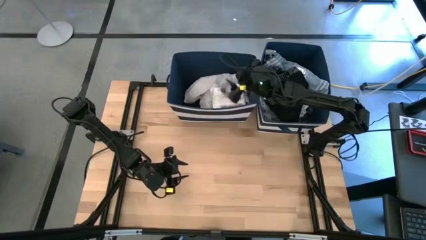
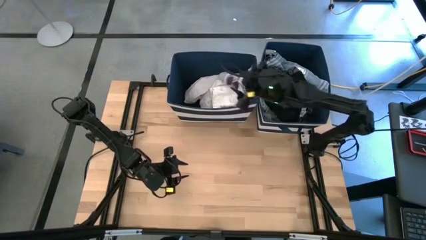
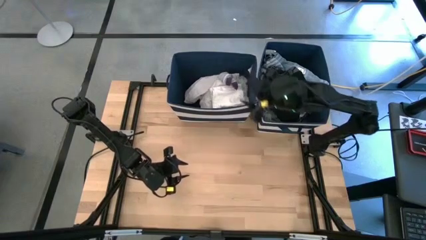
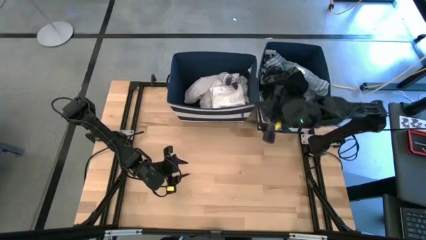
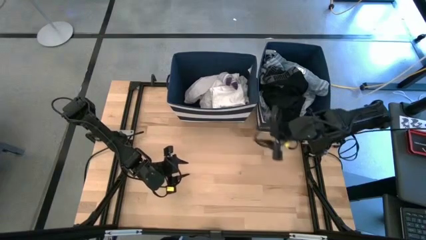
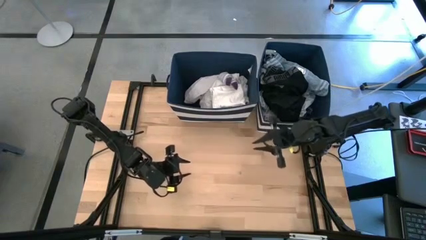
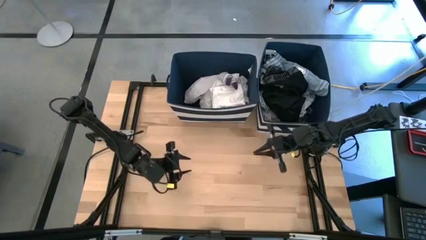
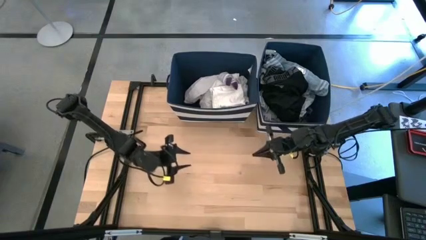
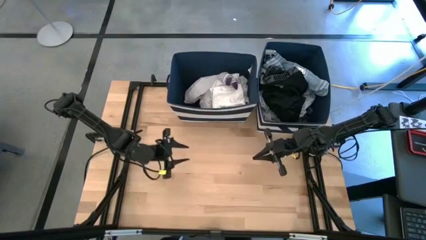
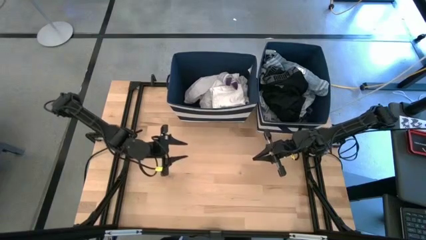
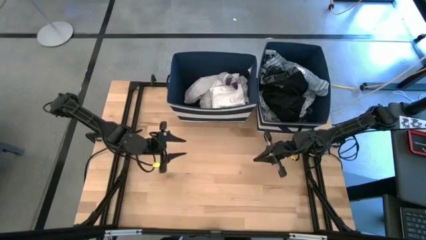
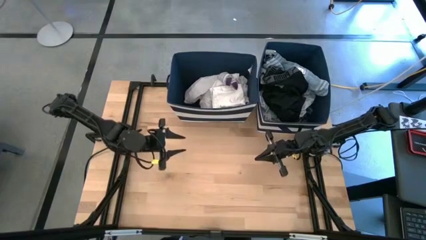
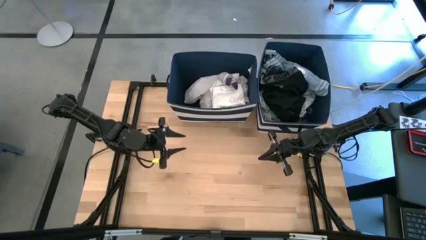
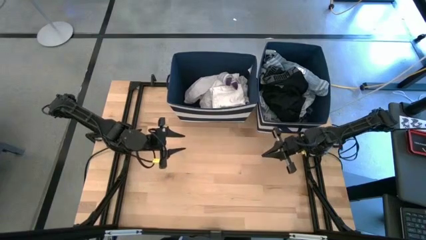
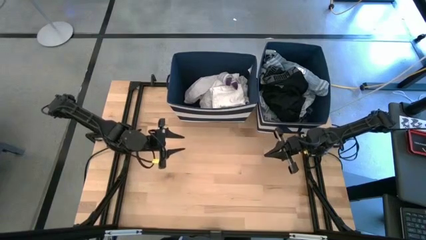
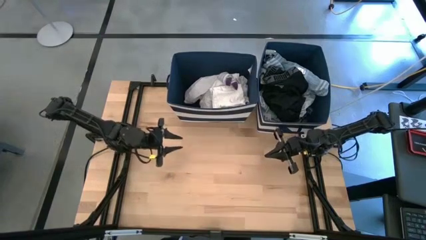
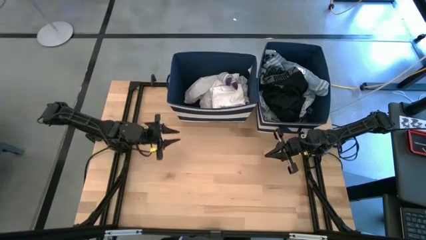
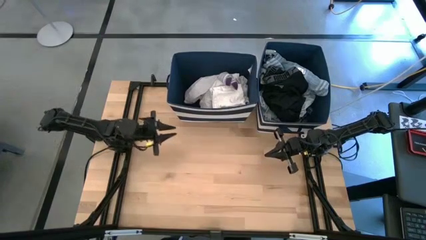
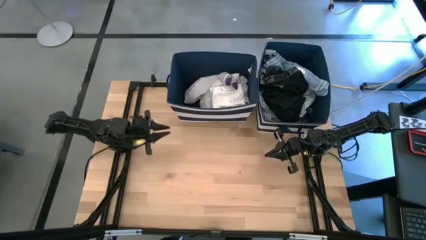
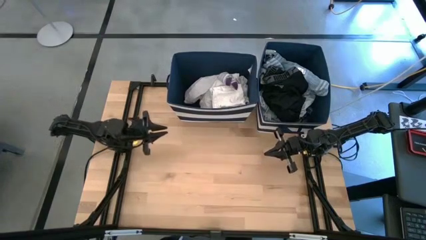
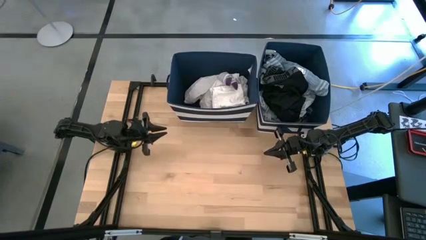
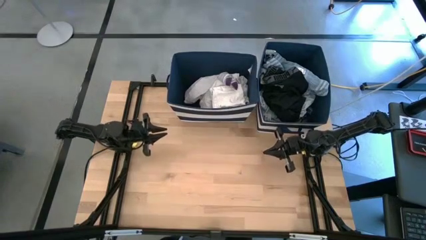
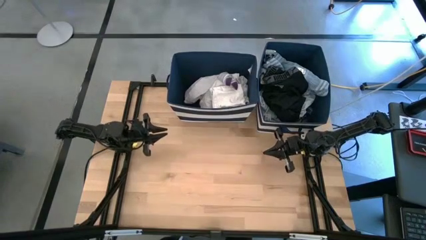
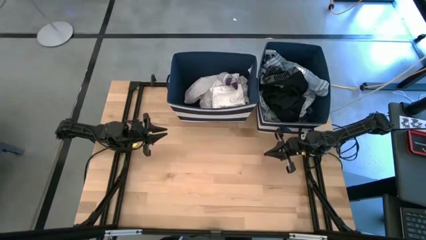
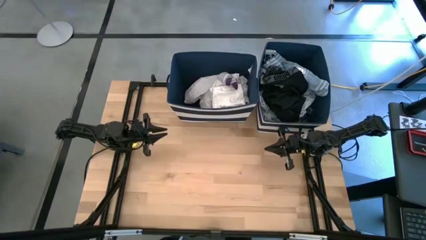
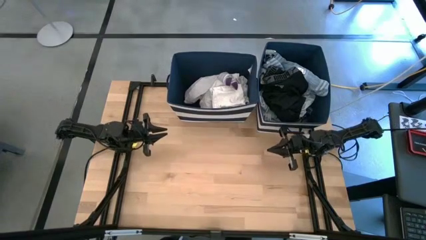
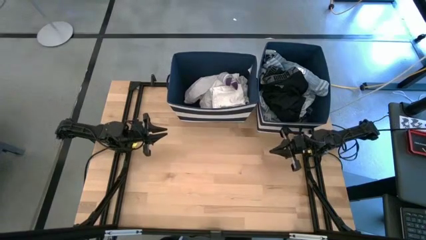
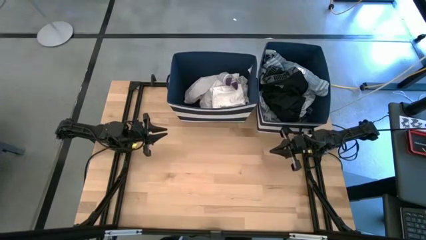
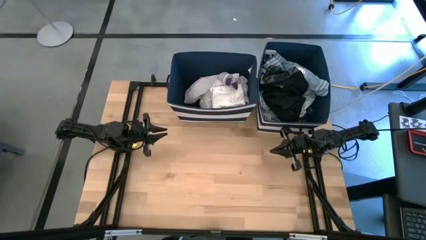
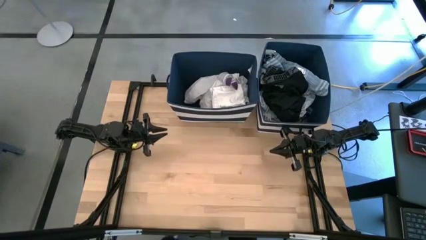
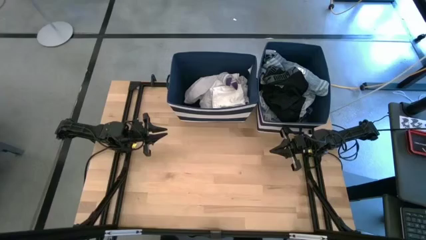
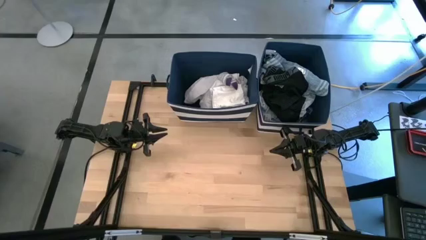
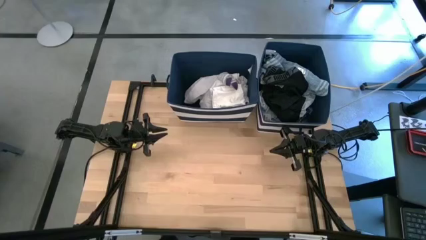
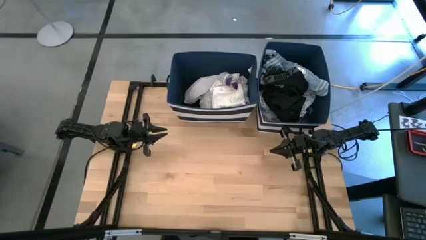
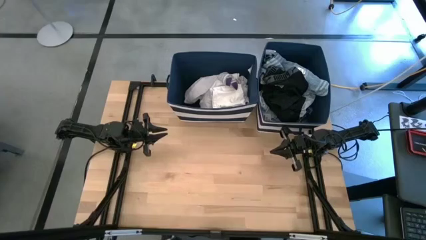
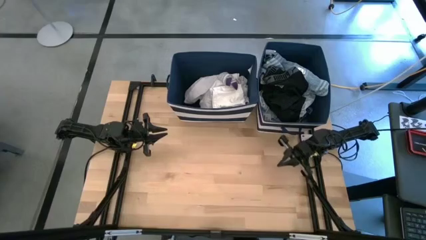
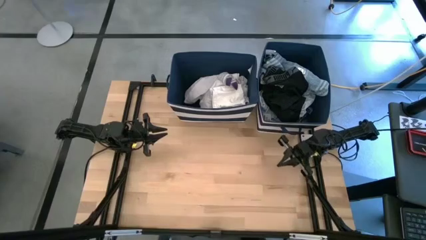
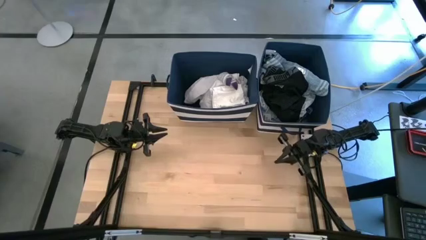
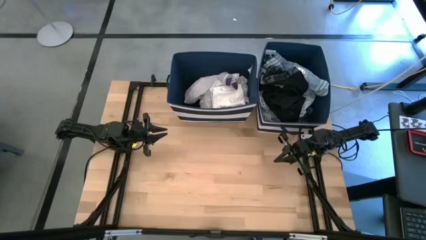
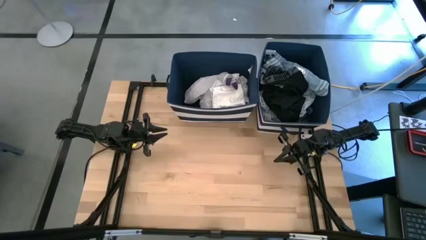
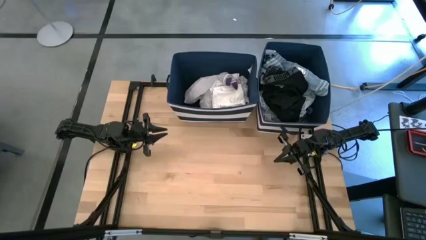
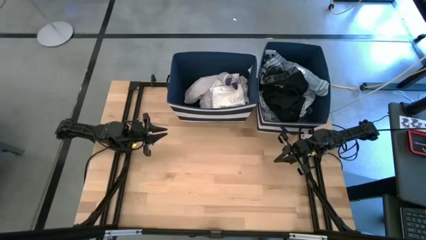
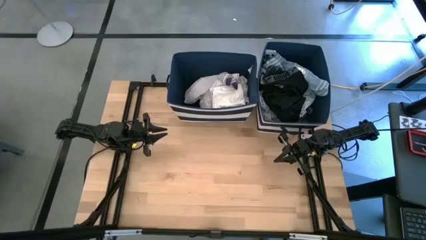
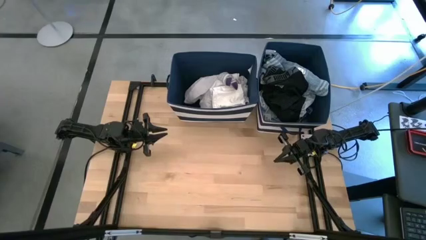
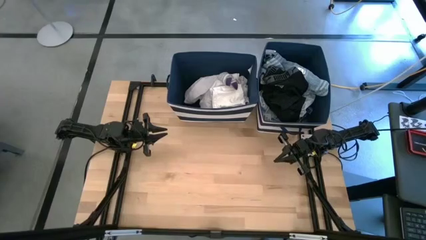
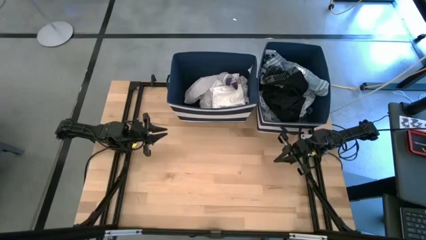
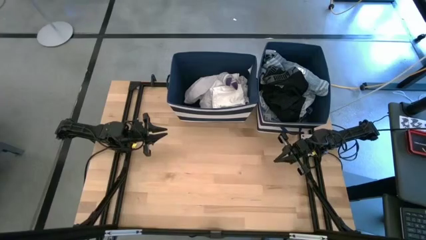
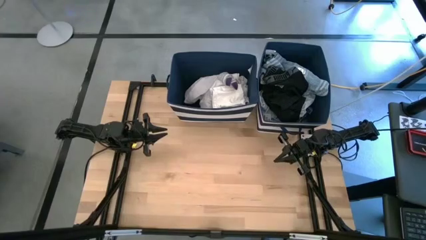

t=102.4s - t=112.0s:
Task: Sort clothes
Return to Home Position

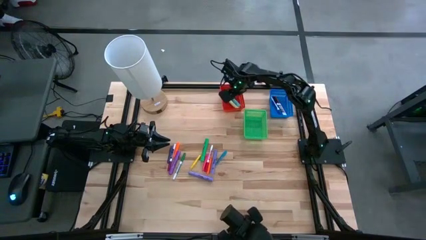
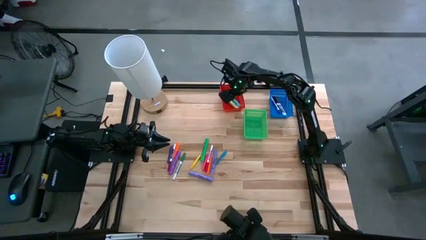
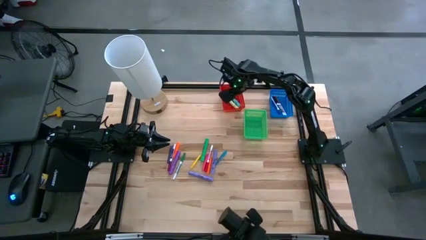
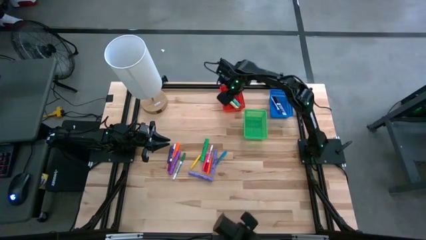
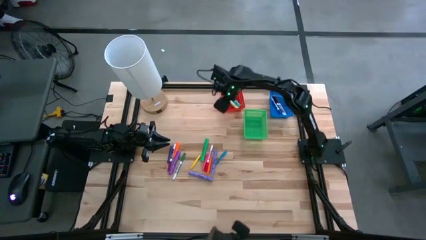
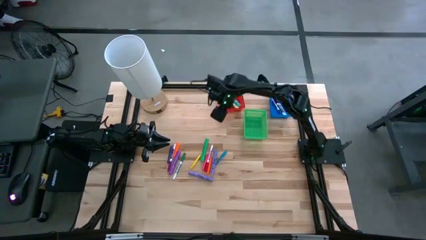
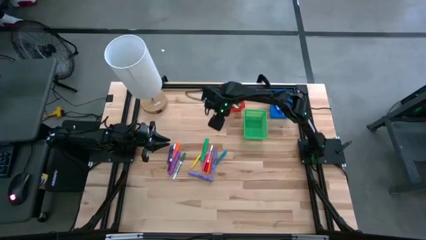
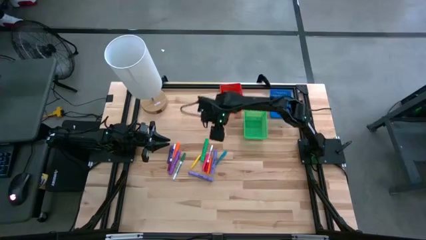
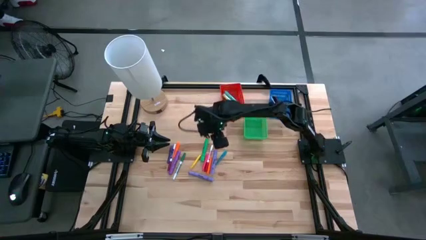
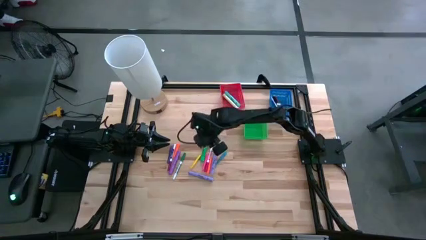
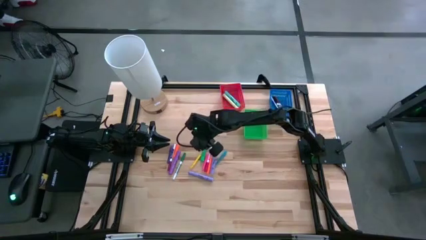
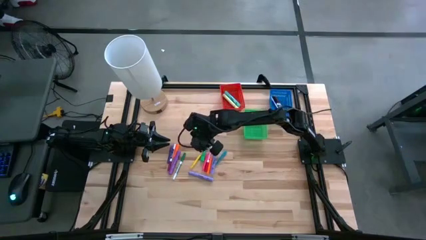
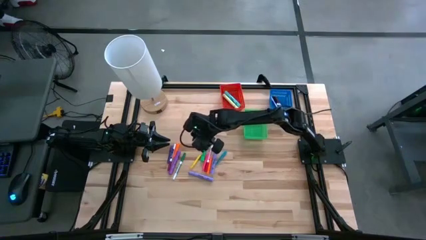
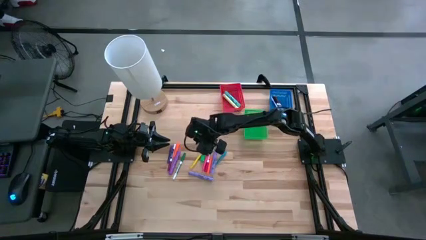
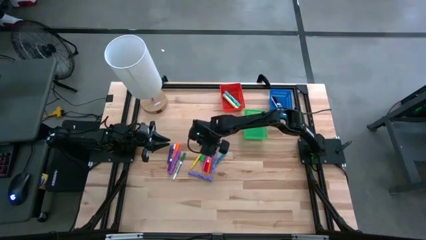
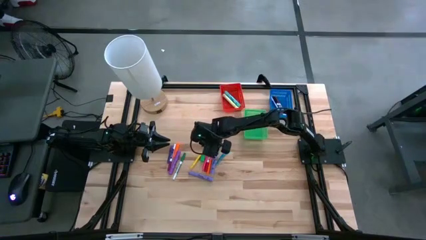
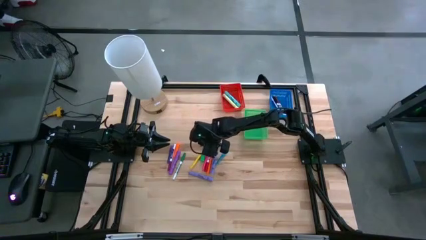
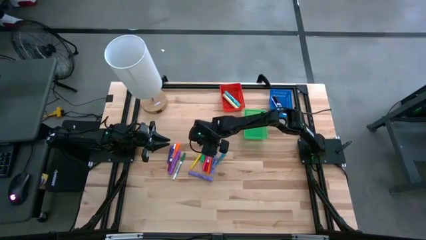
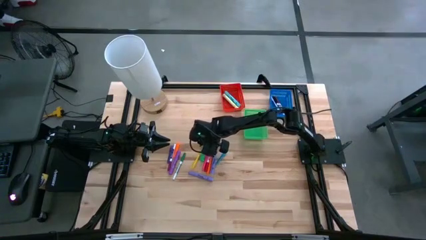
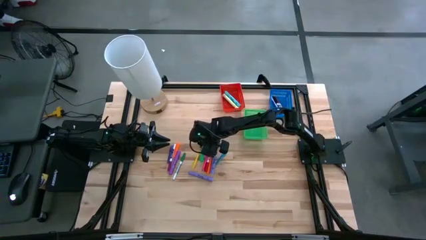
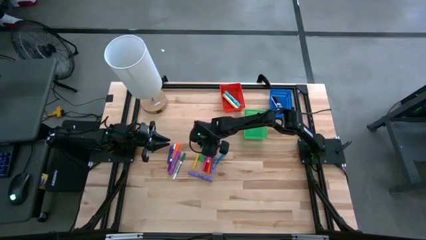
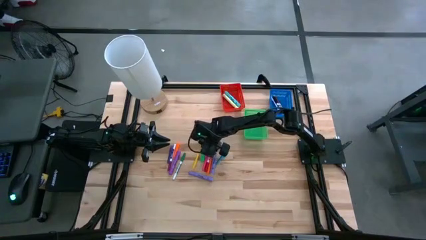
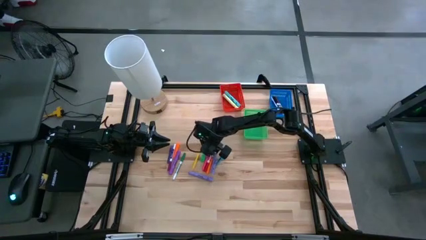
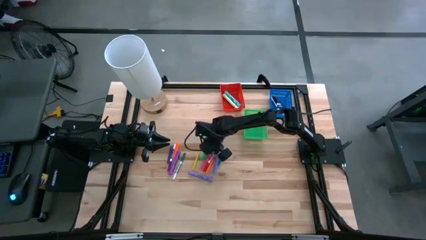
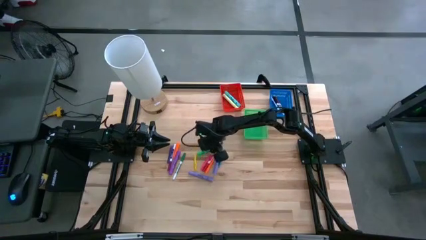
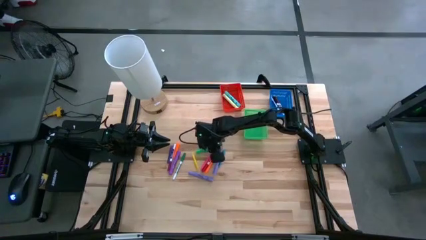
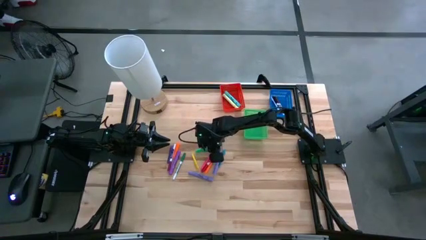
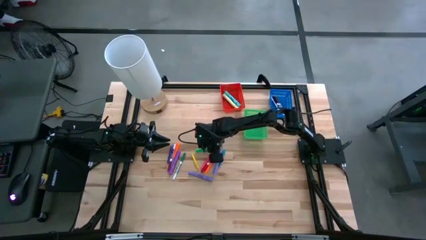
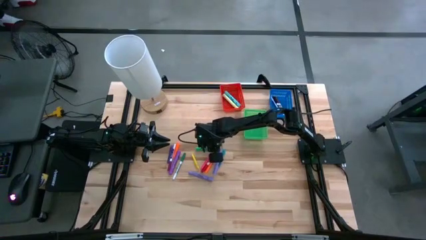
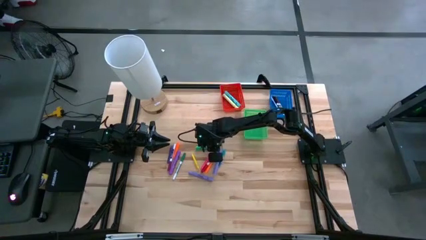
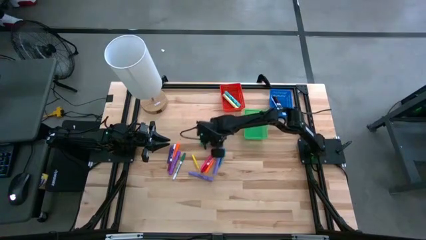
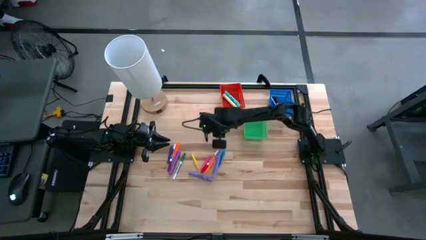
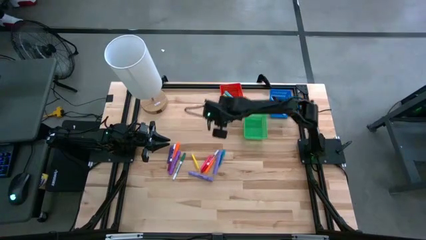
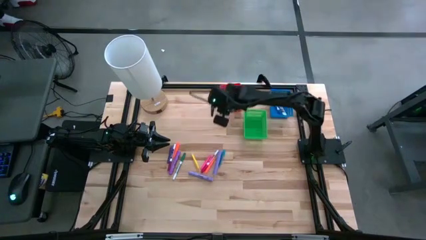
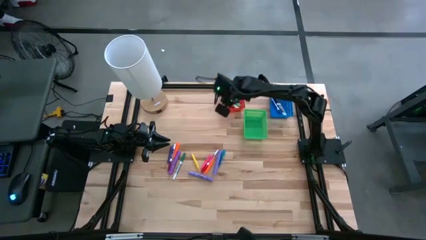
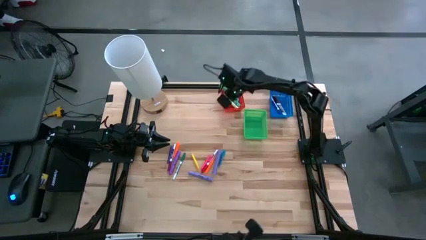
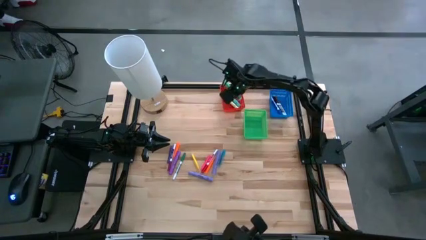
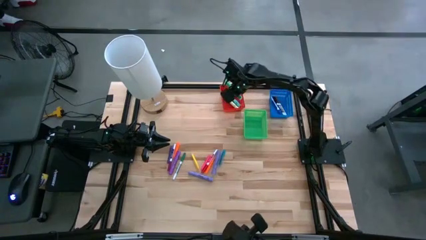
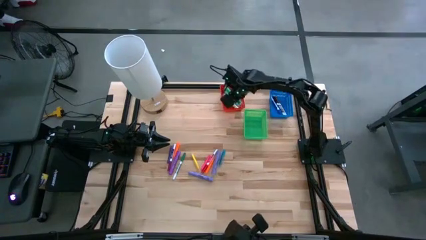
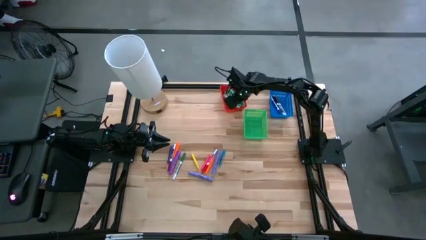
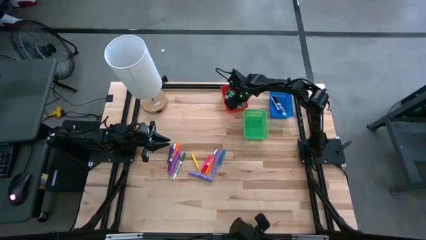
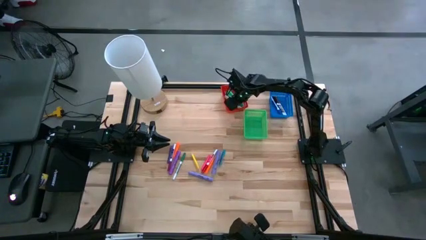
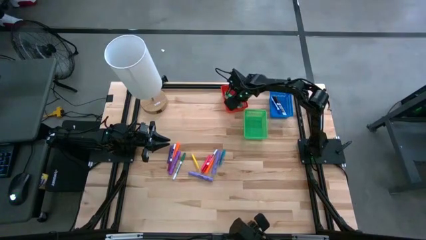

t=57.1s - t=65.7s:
Task: Pick & Place Markers
Put the green highlighter in the red bin
